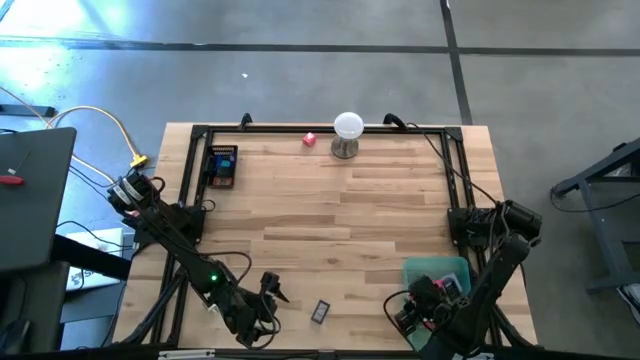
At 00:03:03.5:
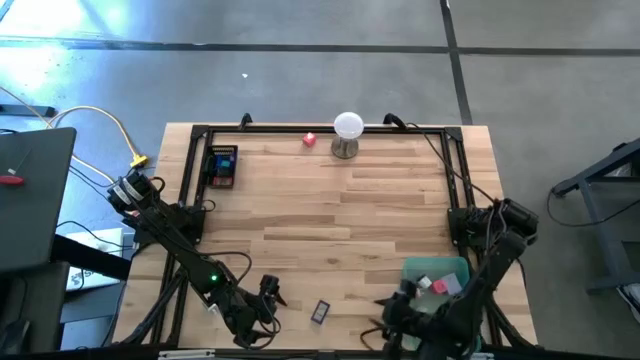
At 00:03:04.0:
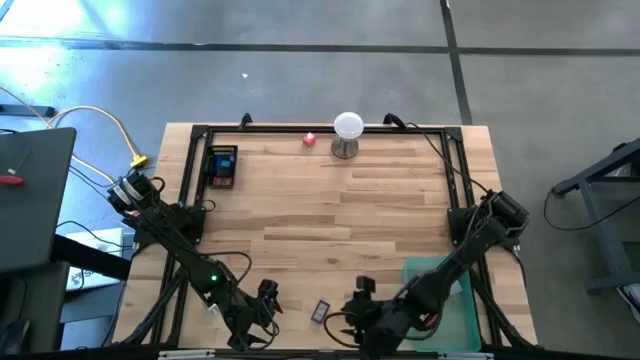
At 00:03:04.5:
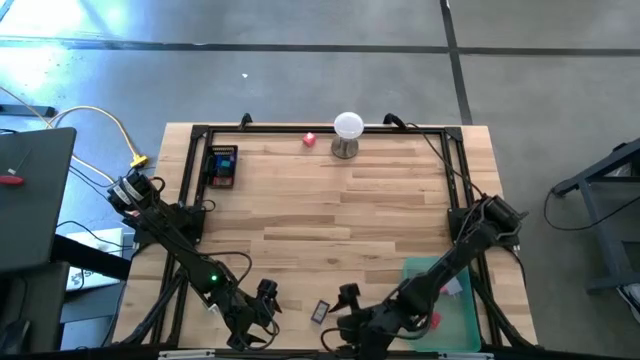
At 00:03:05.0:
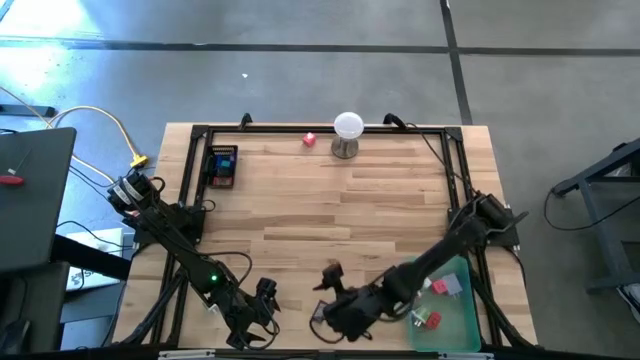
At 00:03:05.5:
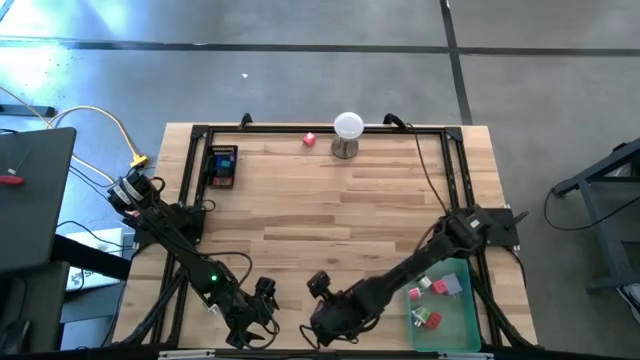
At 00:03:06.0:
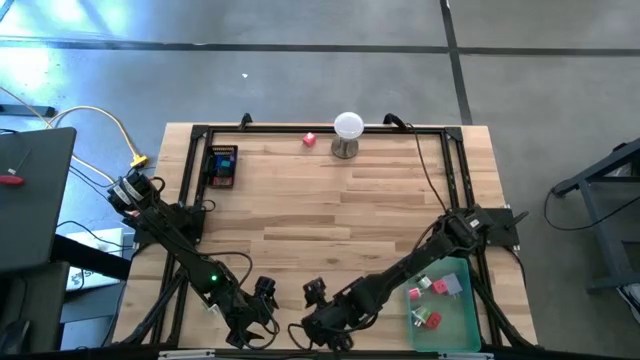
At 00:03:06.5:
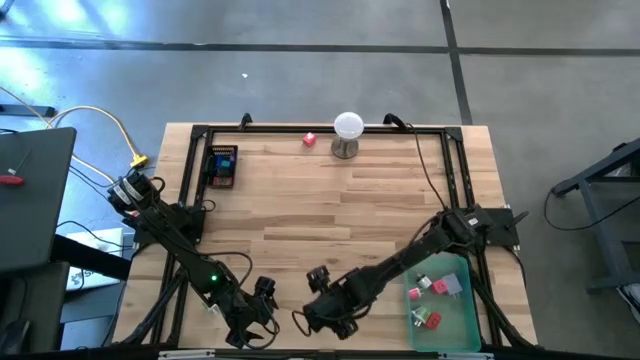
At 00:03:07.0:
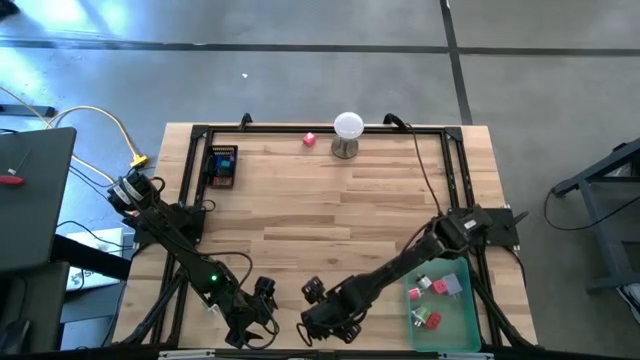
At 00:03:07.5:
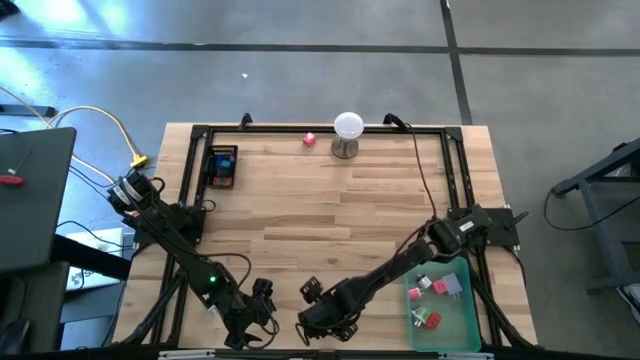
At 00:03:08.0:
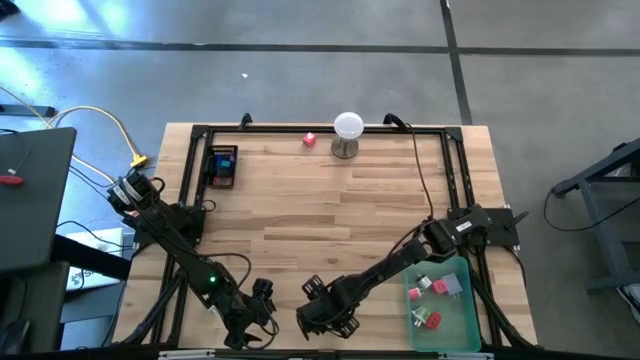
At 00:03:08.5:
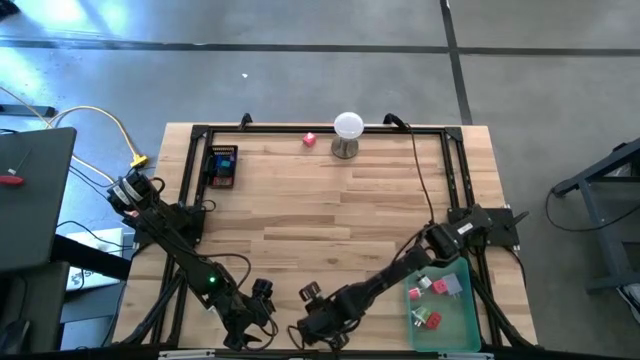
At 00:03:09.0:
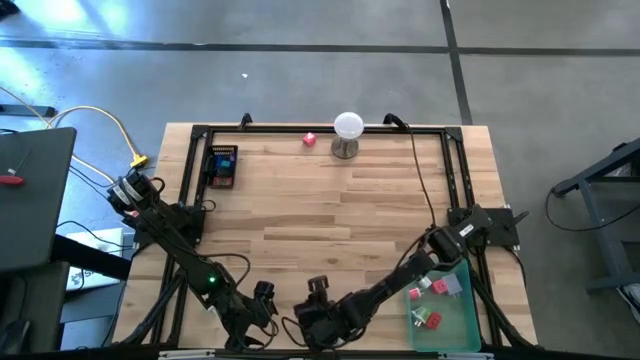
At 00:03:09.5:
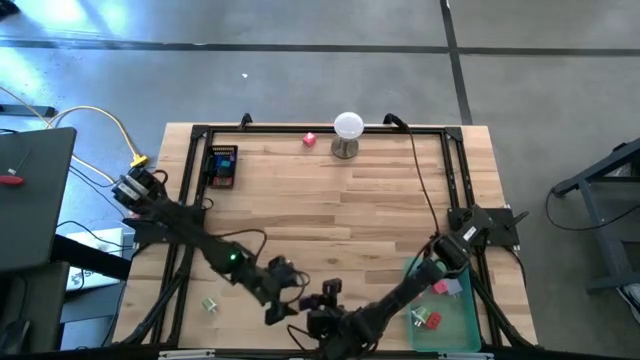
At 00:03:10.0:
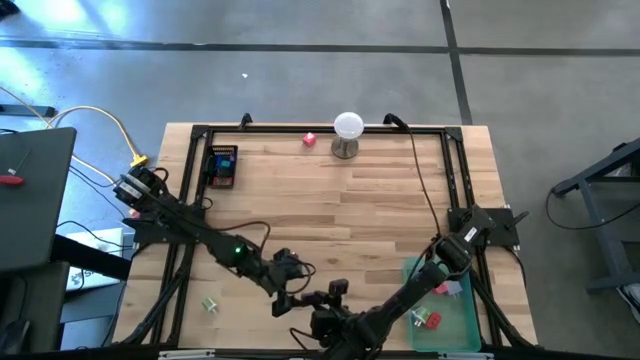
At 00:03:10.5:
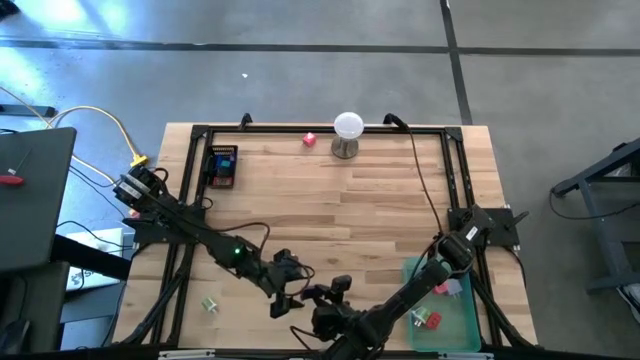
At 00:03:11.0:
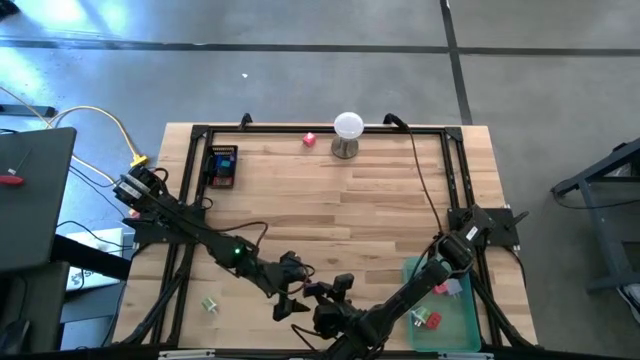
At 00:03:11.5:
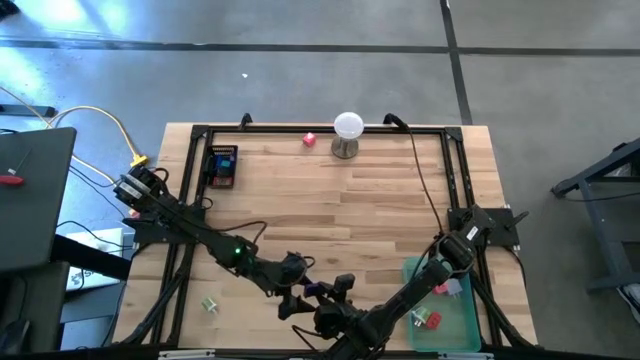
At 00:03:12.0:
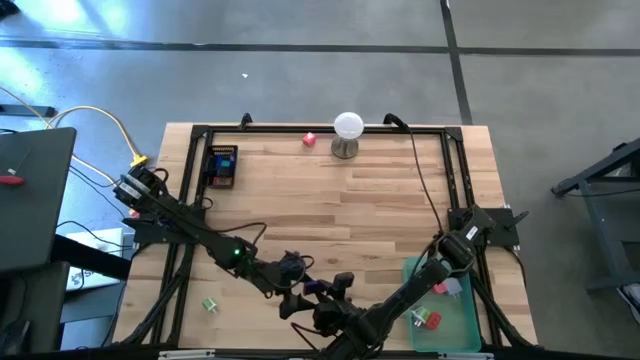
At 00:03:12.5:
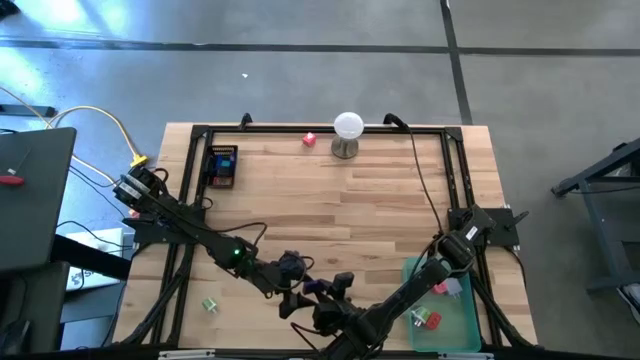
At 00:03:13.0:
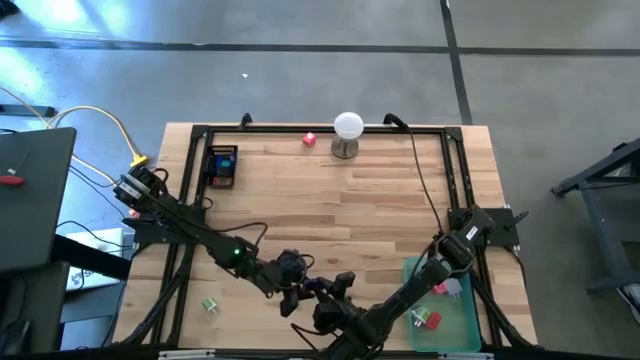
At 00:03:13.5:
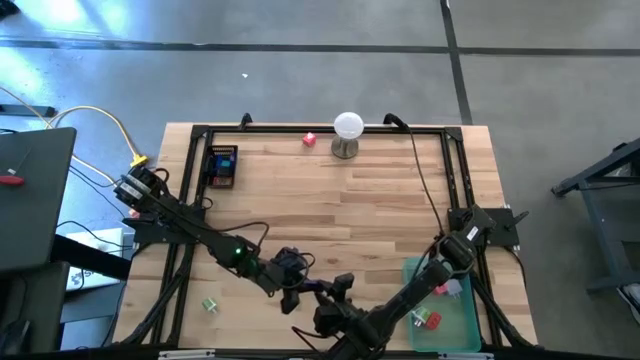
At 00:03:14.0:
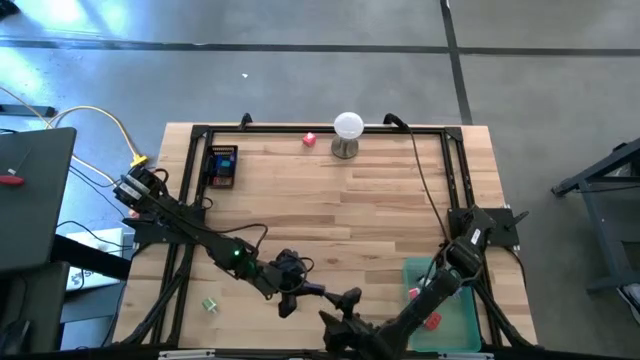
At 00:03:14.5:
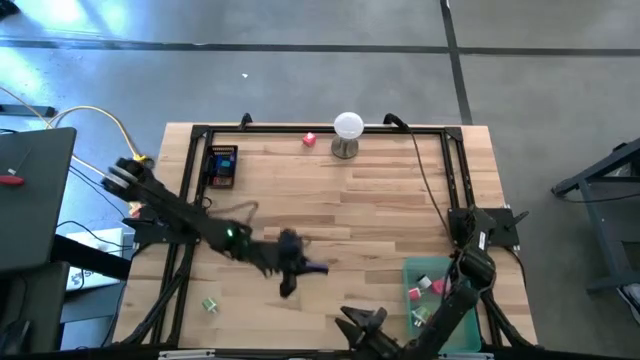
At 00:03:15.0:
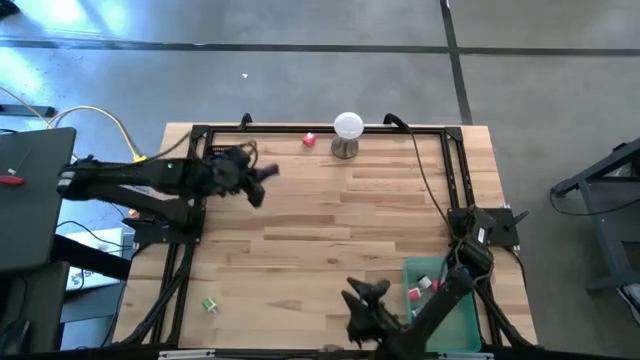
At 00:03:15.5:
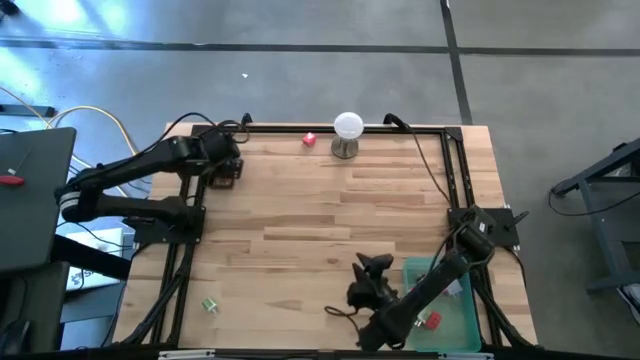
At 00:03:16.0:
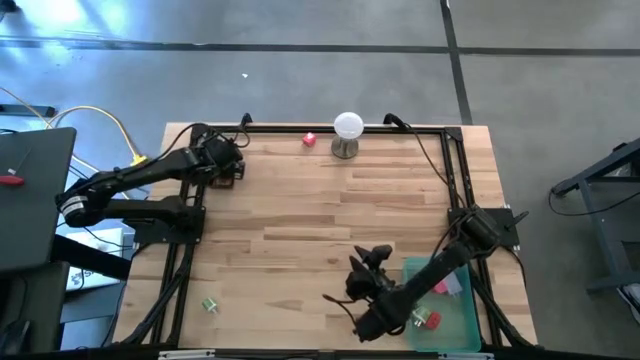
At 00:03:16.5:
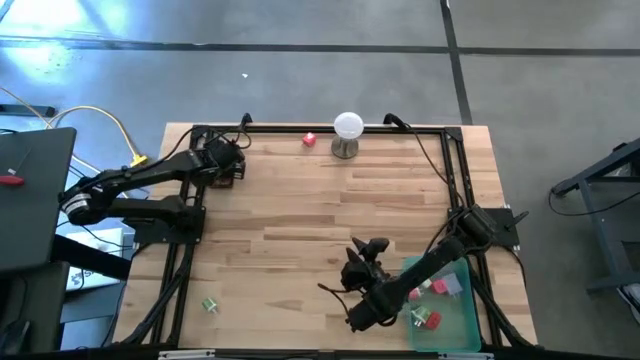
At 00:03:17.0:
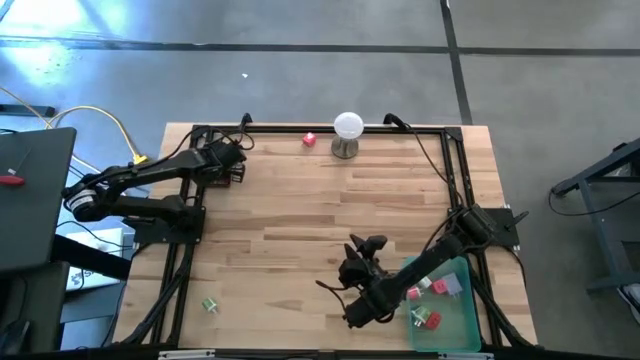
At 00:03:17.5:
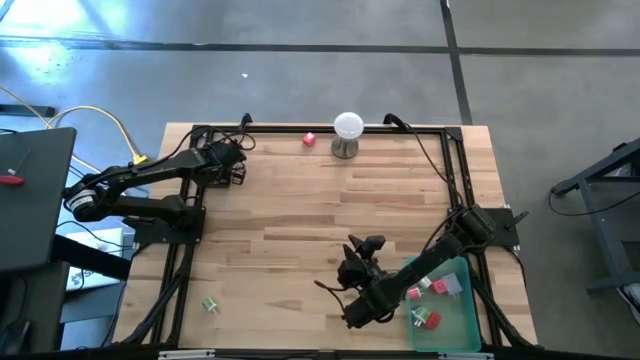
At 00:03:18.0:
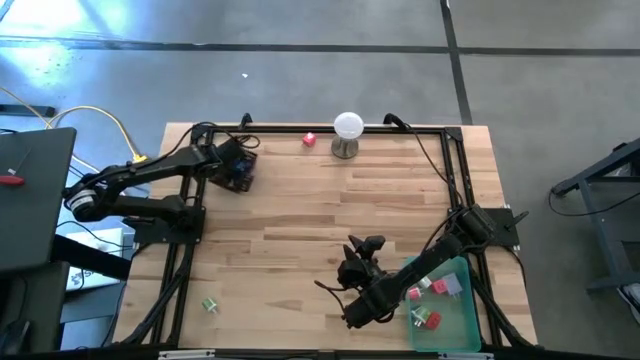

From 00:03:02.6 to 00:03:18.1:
Task: Pick & Place Office items
Put the dark blue digital clock into the black bin

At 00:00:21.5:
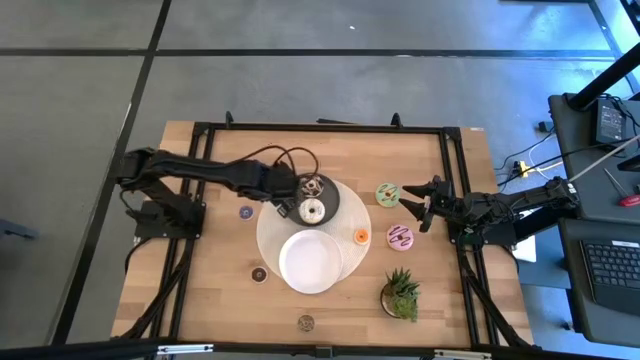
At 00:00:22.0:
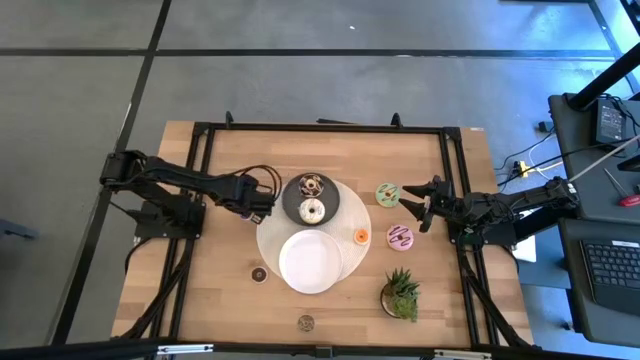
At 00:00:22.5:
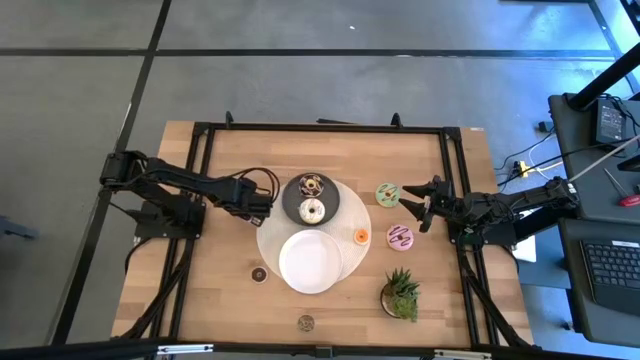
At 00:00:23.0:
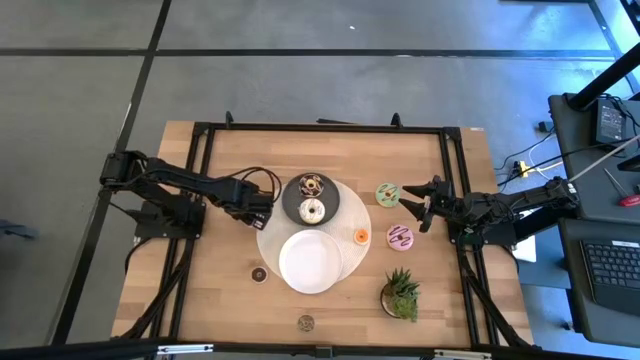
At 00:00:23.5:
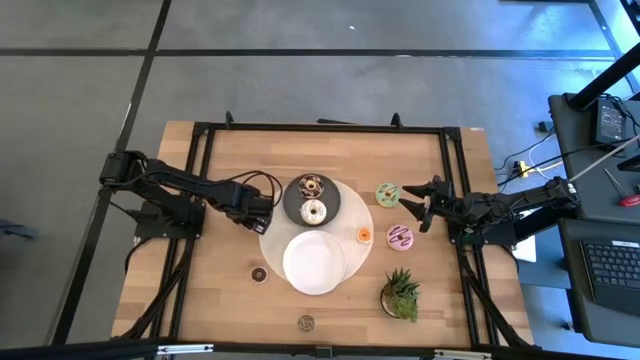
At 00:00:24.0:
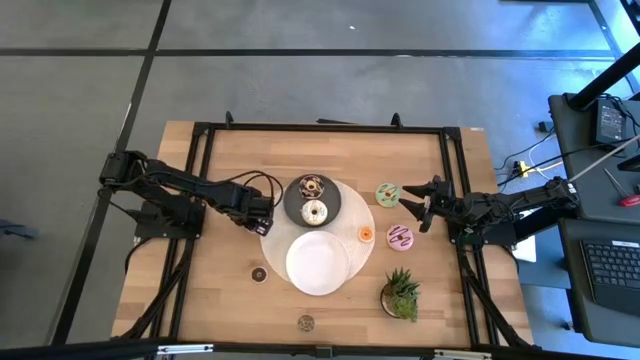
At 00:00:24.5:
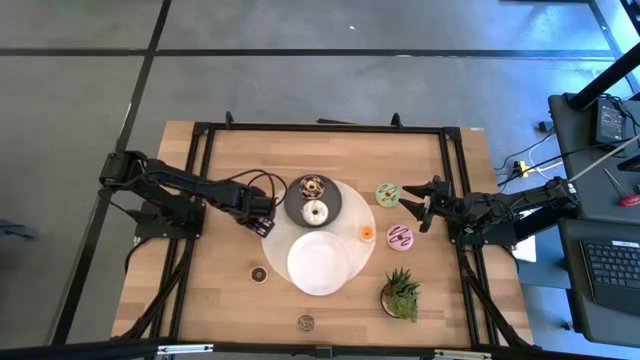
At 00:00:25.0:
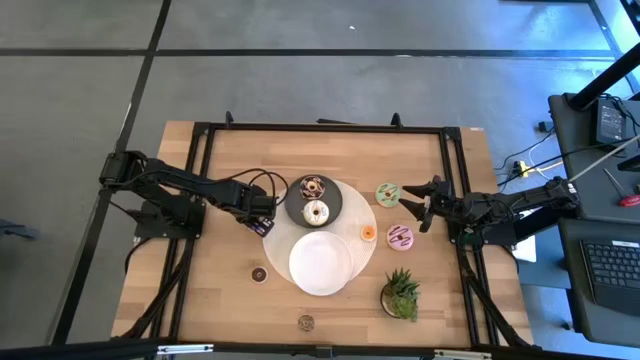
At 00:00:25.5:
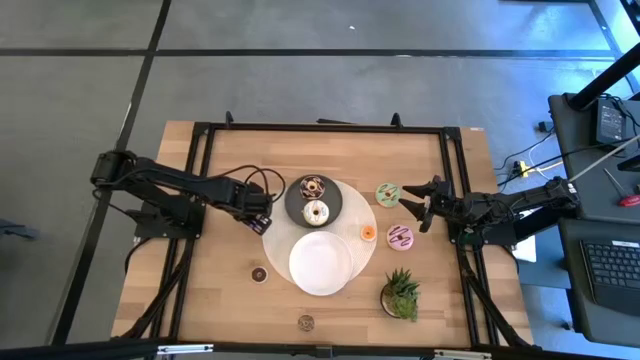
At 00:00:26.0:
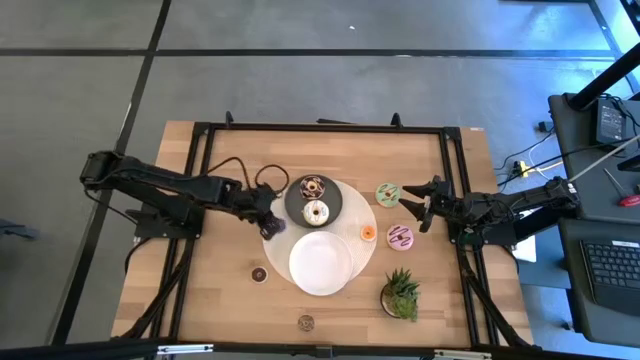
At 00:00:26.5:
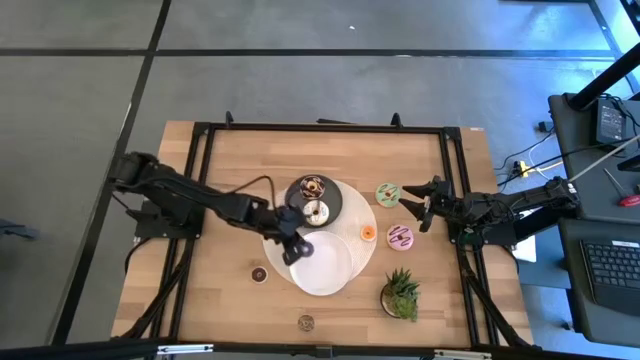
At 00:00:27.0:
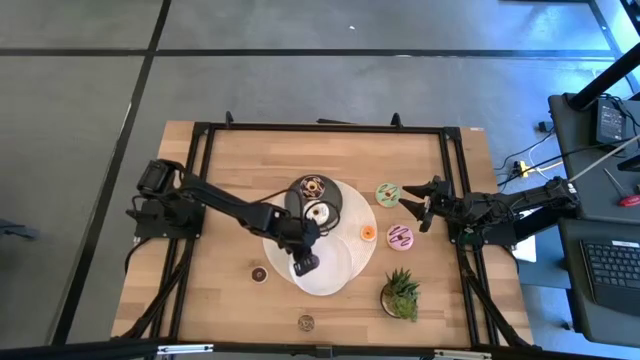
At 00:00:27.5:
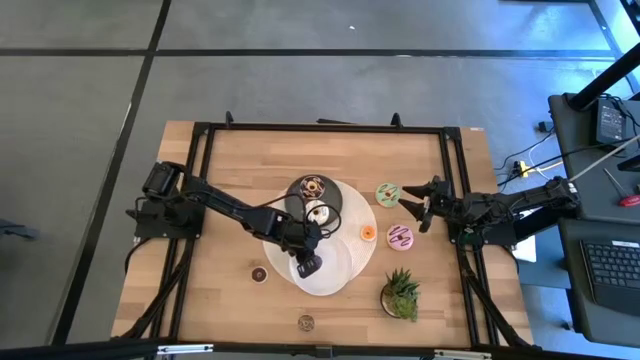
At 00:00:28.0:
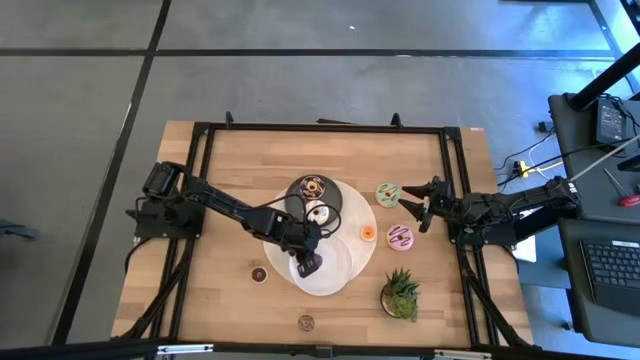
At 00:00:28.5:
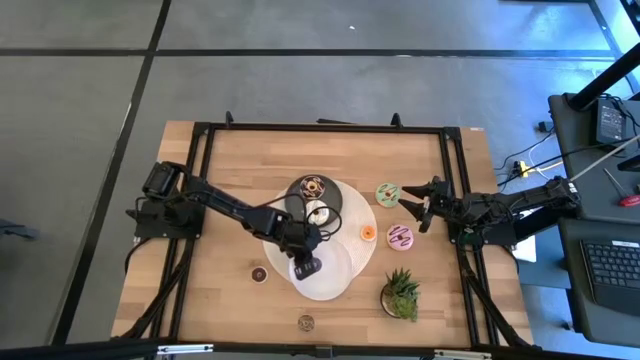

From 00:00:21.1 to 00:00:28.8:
Task: Pick & Place donuts
Put the small blue donut on the white plate
